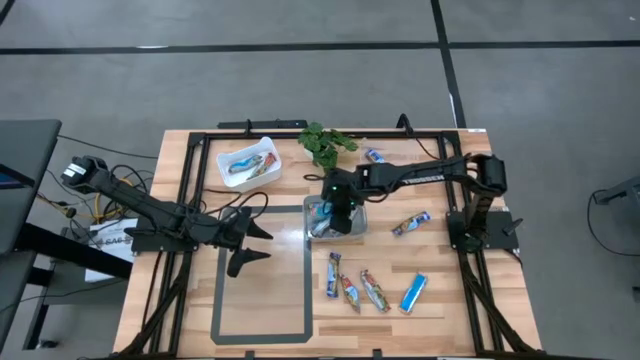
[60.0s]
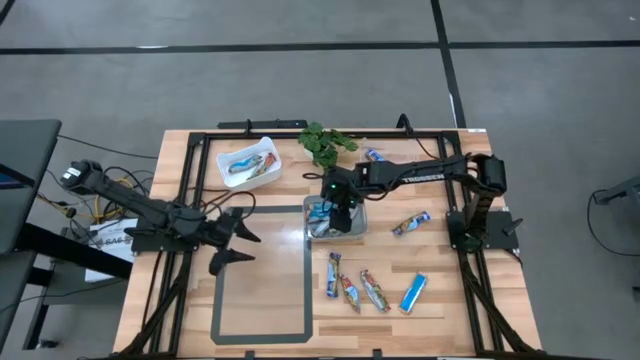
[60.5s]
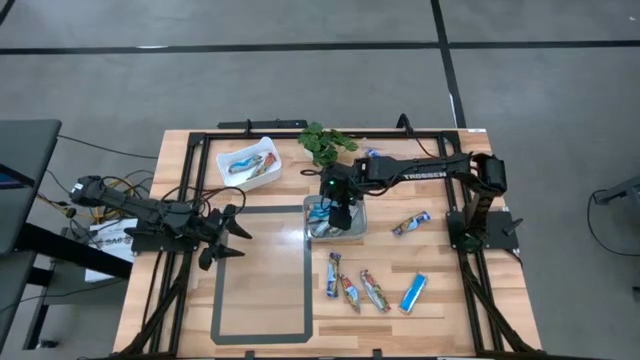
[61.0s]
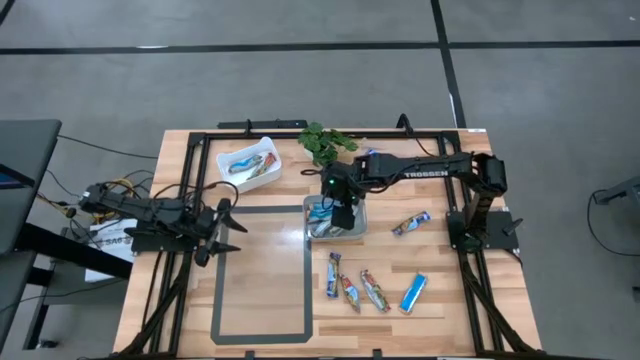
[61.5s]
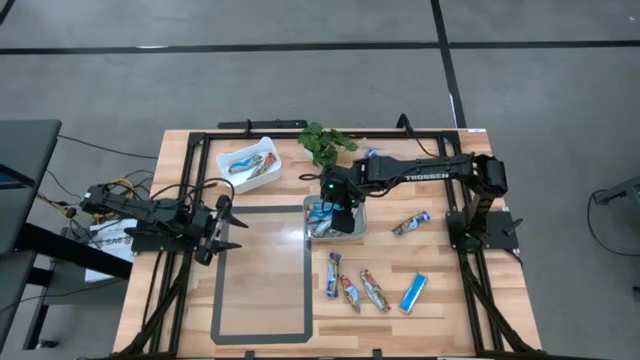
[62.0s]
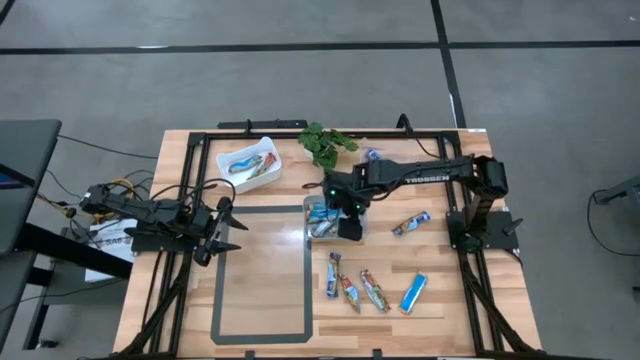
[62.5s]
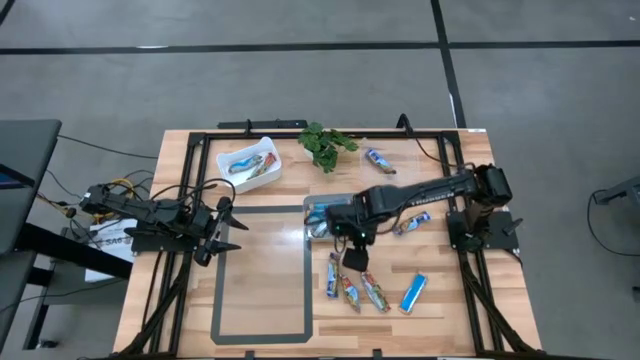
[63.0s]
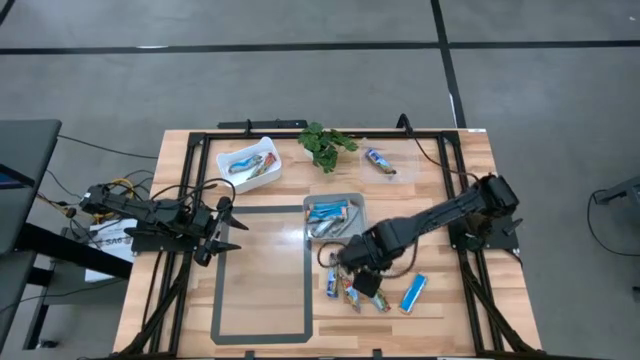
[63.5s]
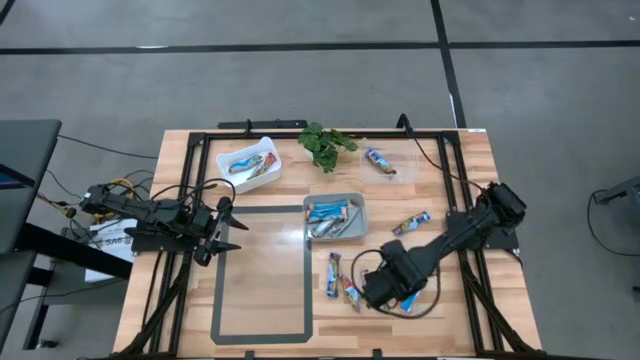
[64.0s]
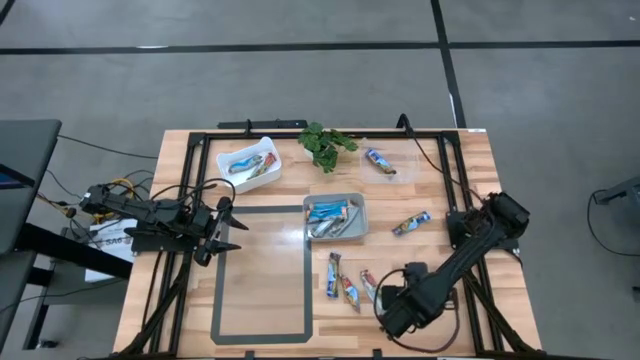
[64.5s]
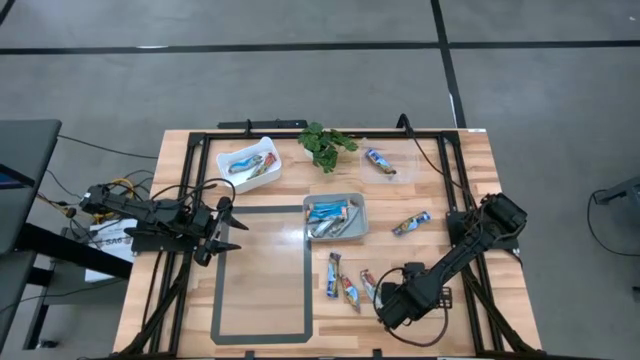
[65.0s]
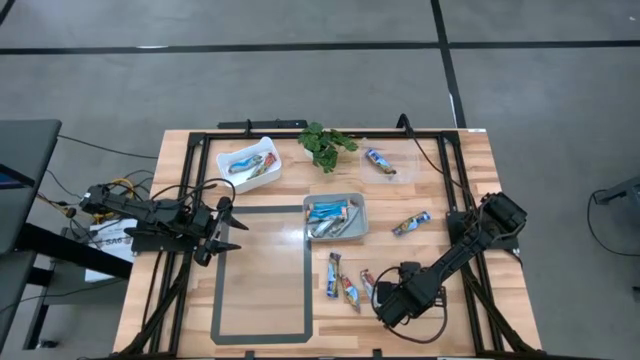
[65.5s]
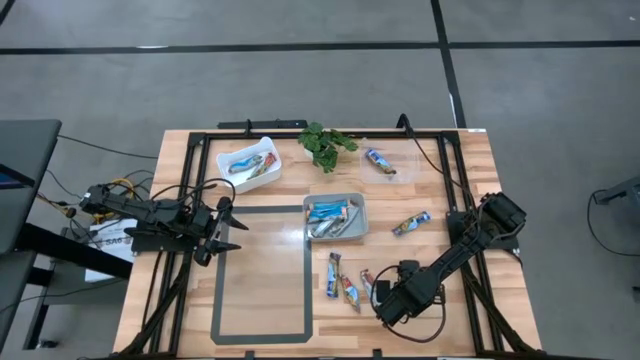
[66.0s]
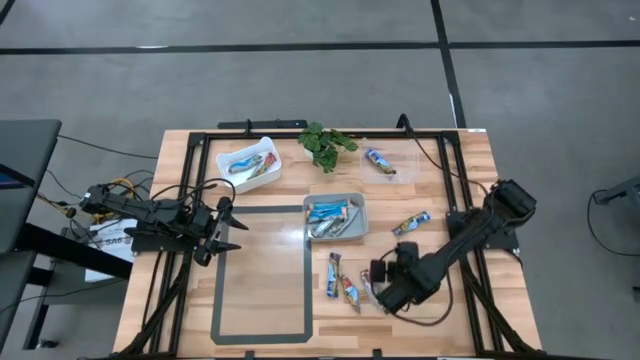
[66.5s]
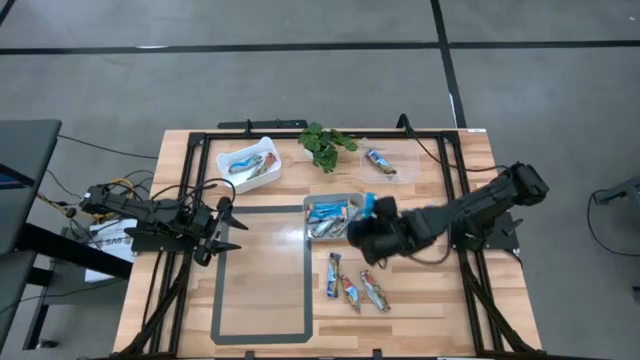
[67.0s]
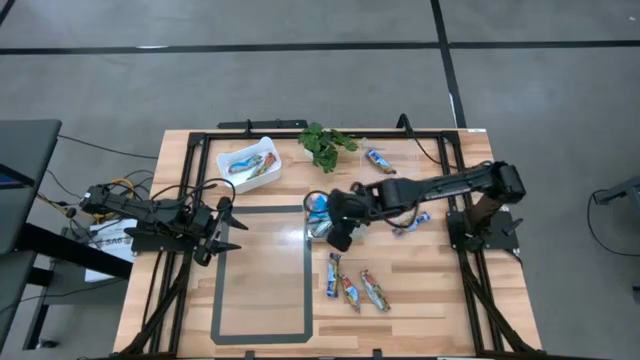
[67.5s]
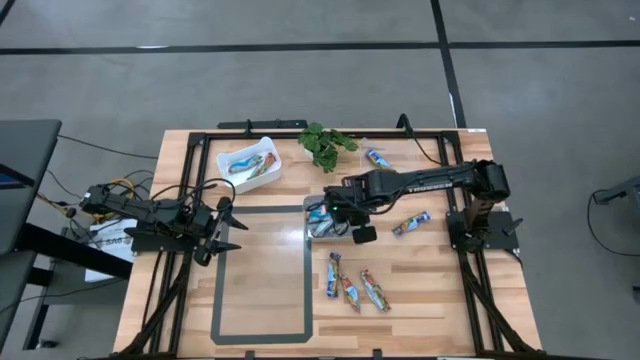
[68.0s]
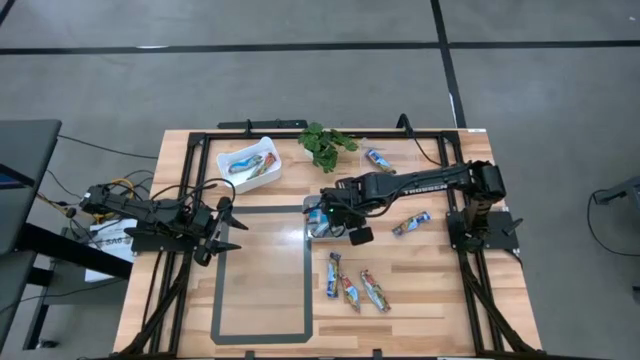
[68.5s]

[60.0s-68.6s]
Task: Pick and place Granola Bars by type
Put the yellow granola bar into the gray bin

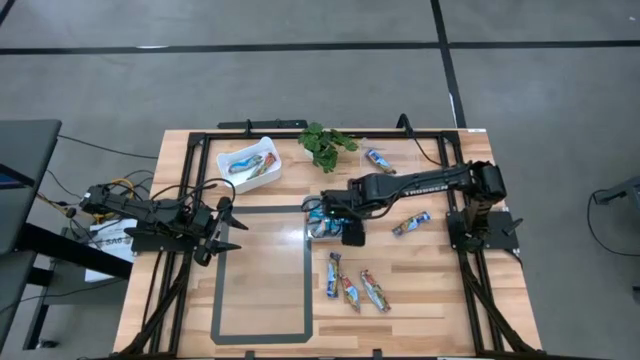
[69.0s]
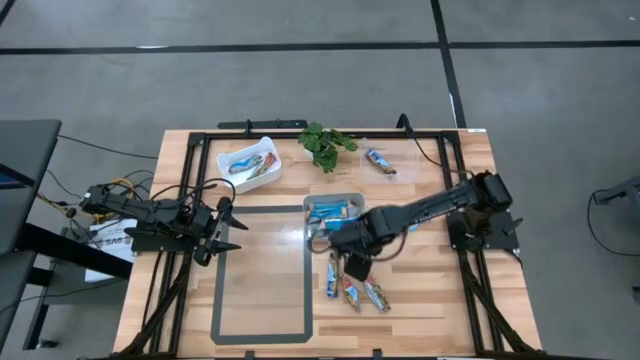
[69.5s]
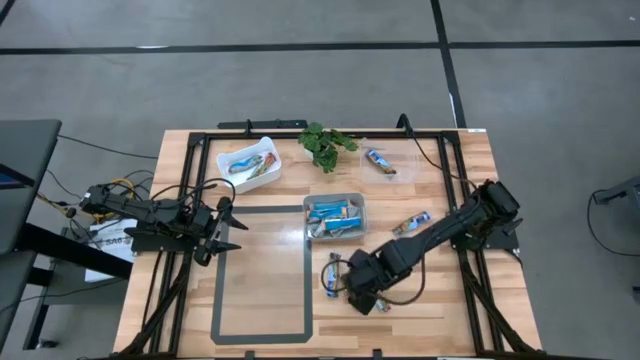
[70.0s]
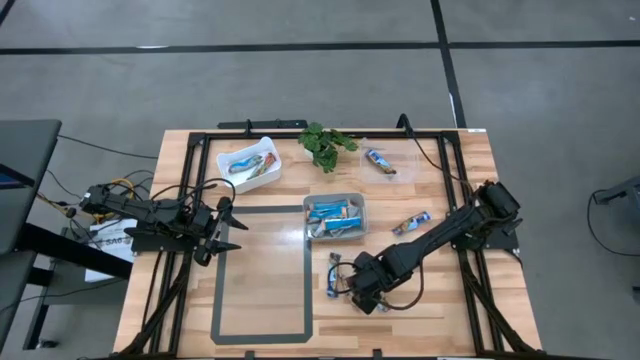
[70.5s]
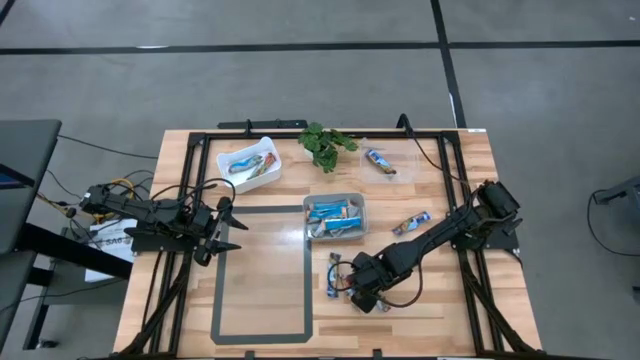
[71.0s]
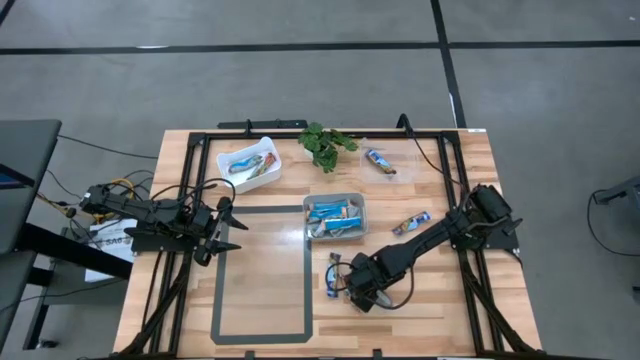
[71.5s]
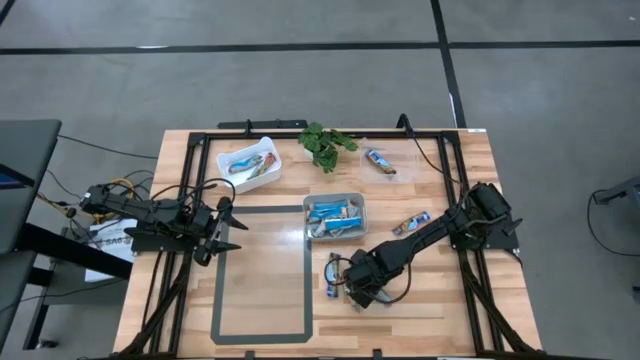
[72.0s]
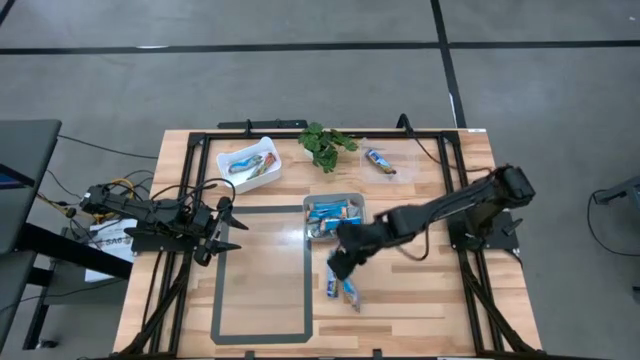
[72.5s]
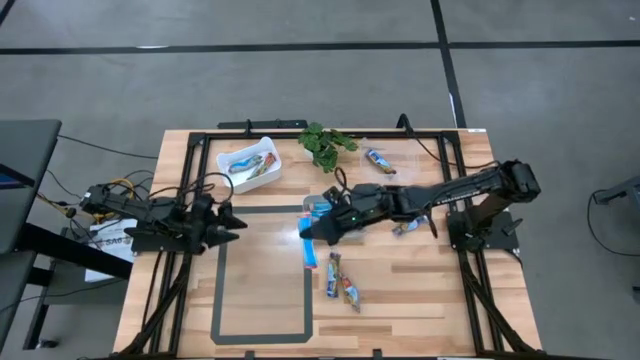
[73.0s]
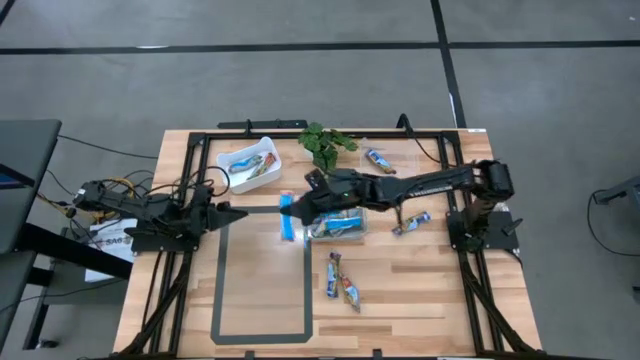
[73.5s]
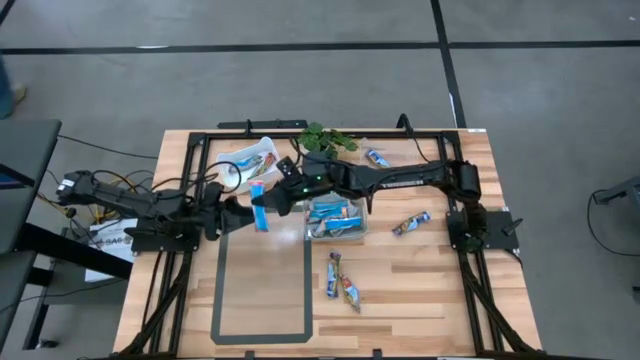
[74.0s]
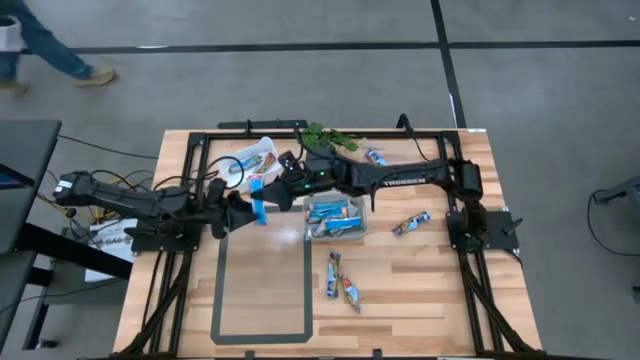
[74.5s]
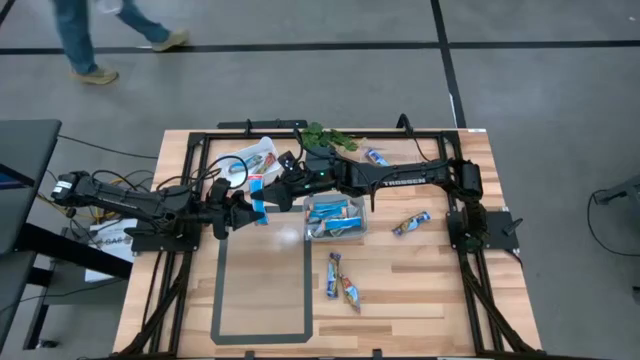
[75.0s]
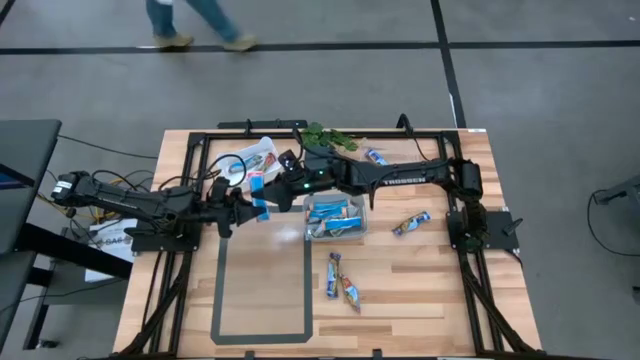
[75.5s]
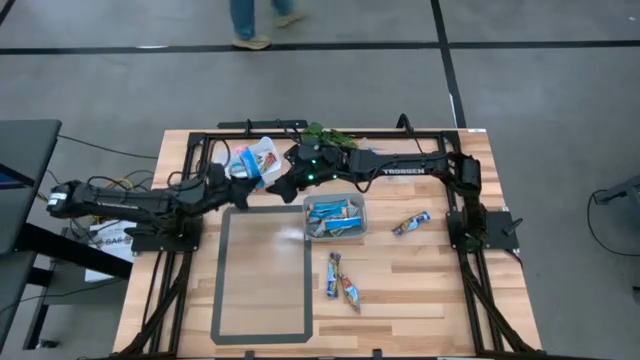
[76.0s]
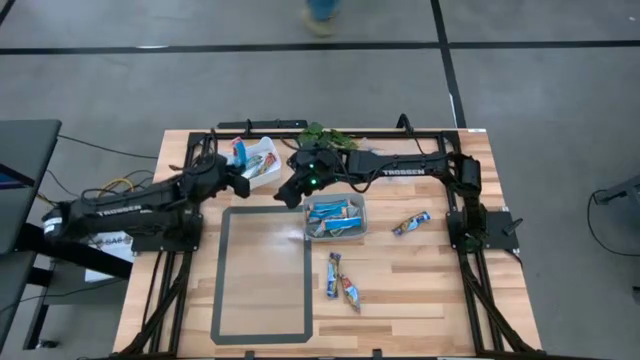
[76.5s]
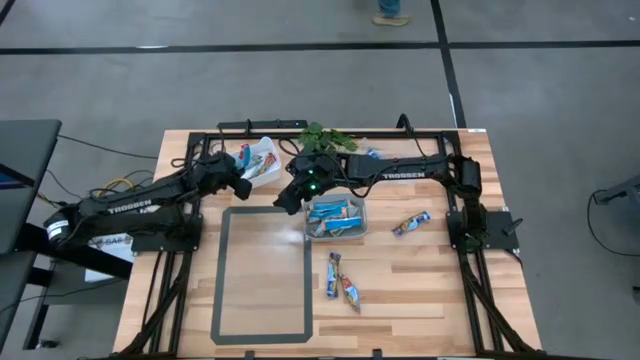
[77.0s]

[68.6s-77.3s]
Put the red granola bar into the white bin

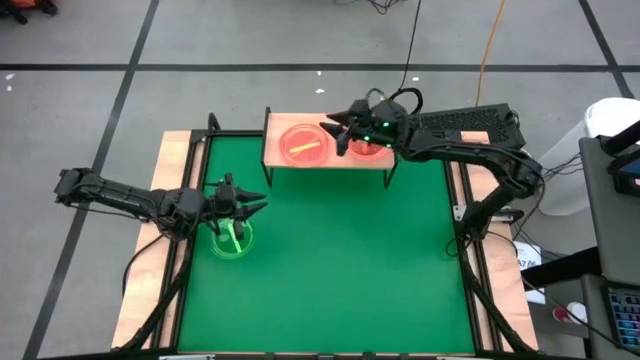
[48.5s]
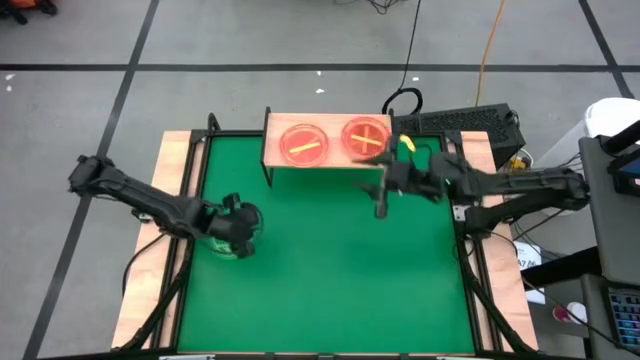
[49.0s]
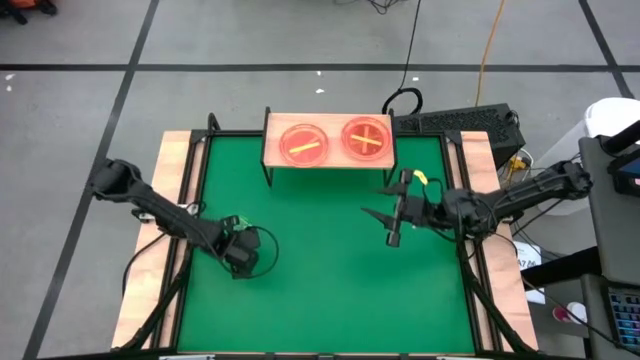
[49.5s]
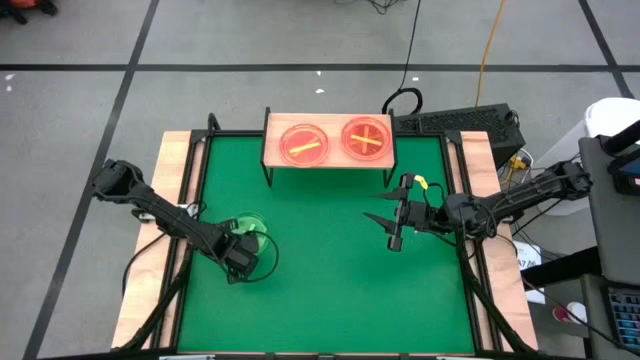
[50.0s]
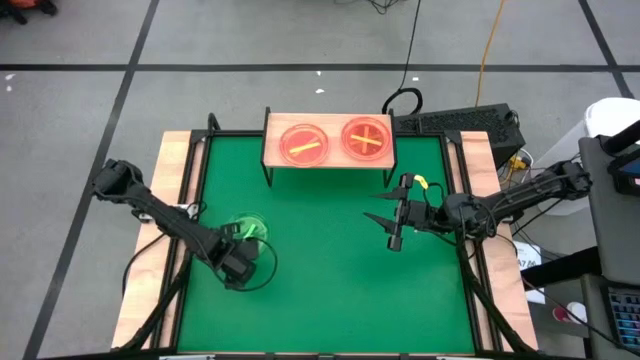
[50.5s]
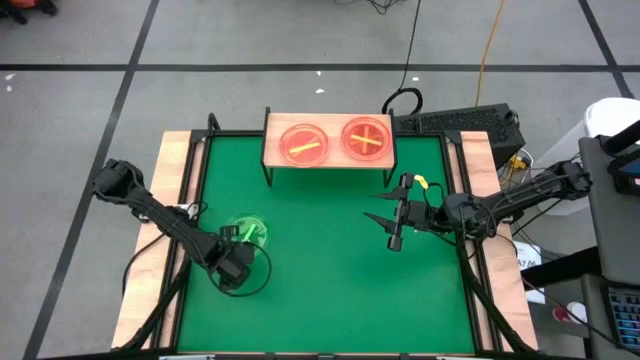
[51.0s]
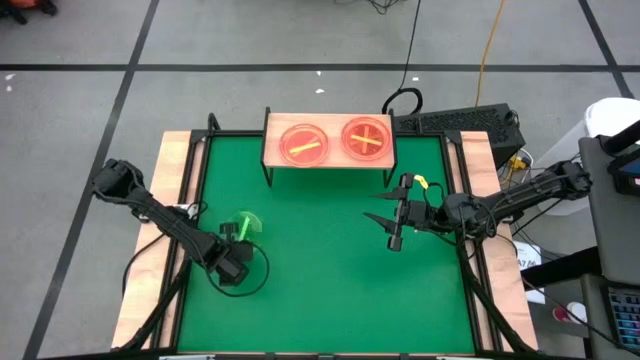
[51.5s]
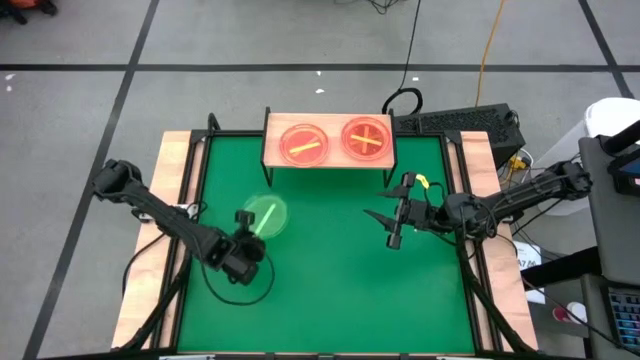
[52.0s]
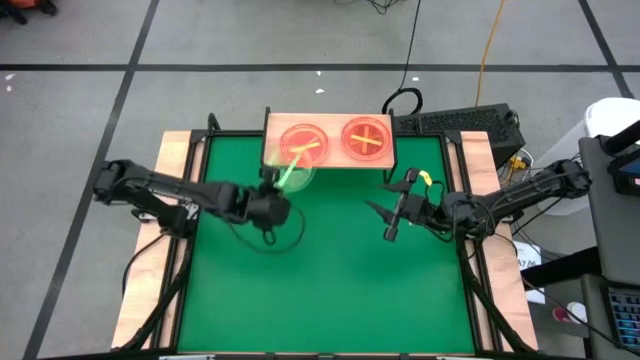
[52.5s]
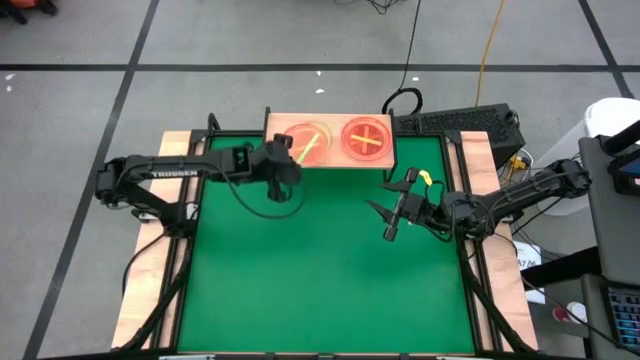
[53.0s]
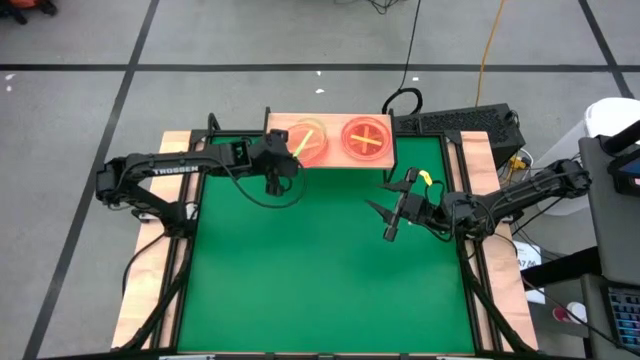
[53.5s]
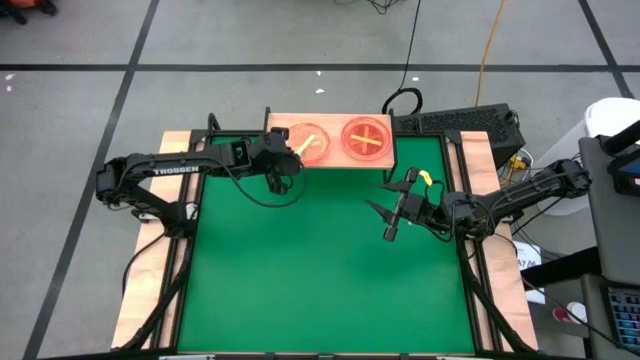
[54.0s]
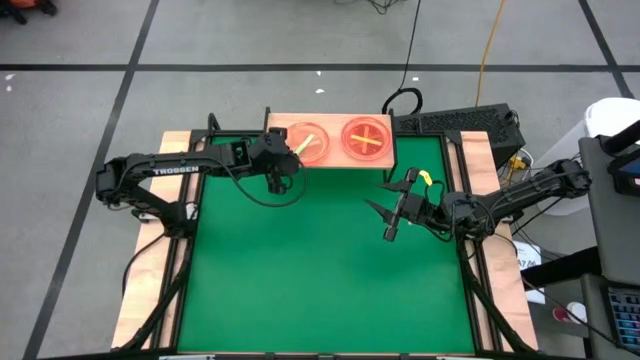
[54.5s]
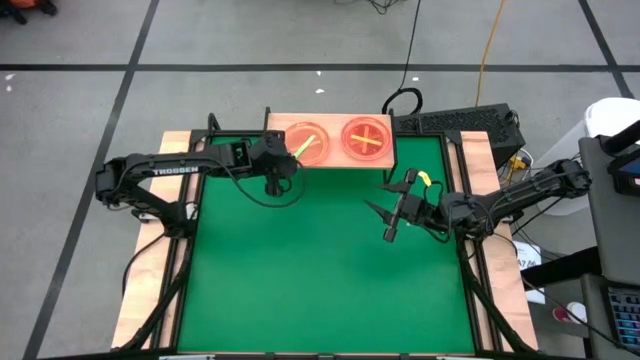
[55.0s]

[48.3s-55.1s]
Task: Place and stack plates onto a shelf
Stack the green plate on top of the left orange plate on the shelf
